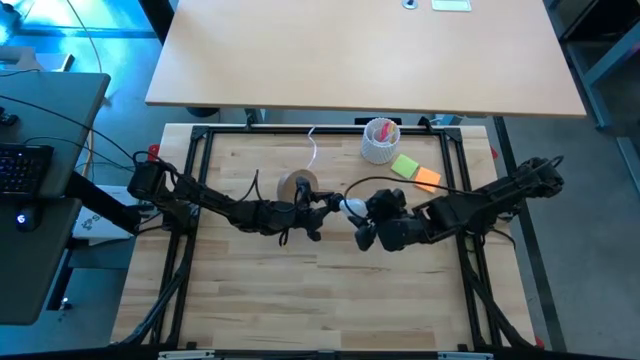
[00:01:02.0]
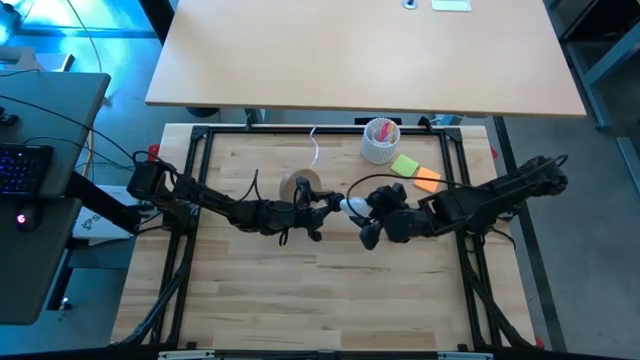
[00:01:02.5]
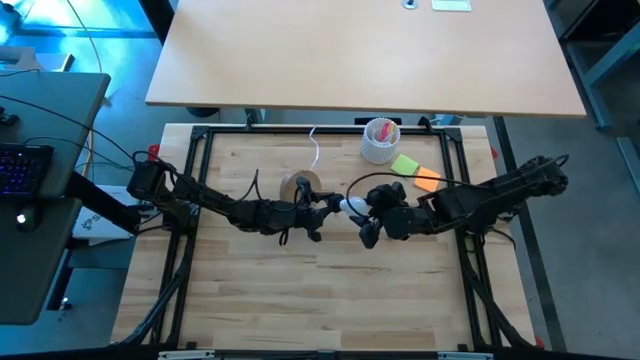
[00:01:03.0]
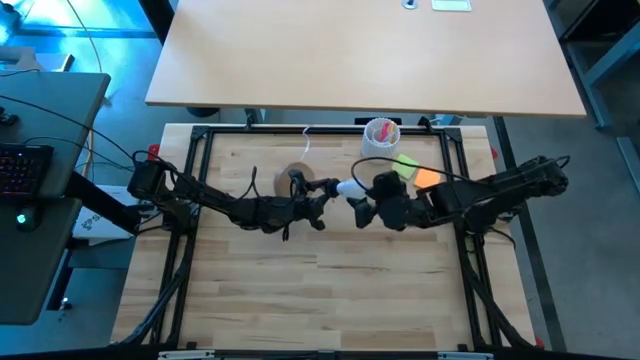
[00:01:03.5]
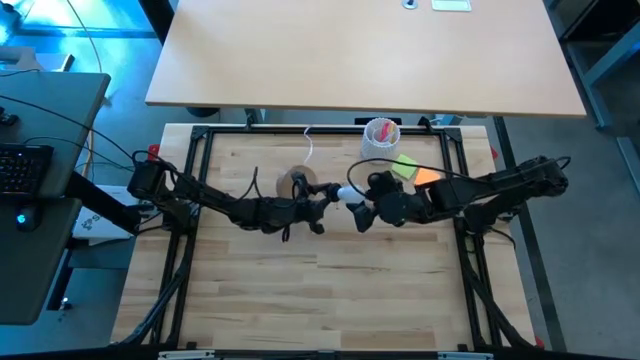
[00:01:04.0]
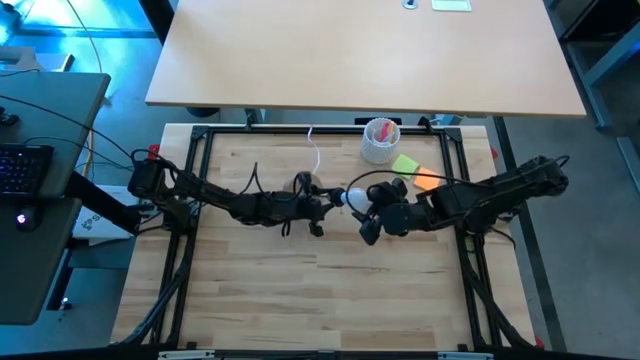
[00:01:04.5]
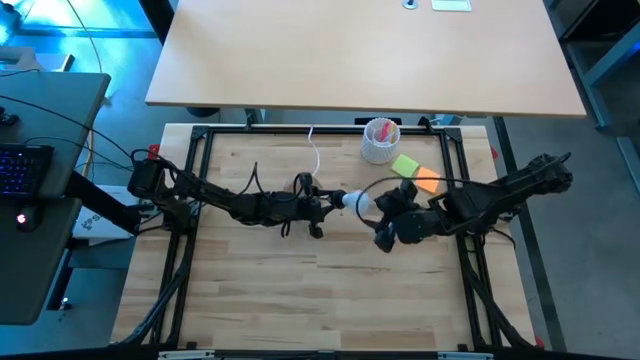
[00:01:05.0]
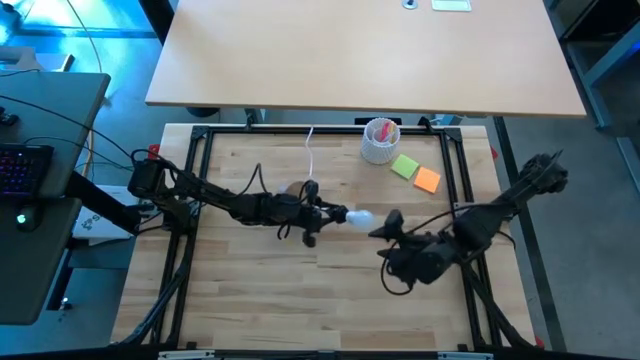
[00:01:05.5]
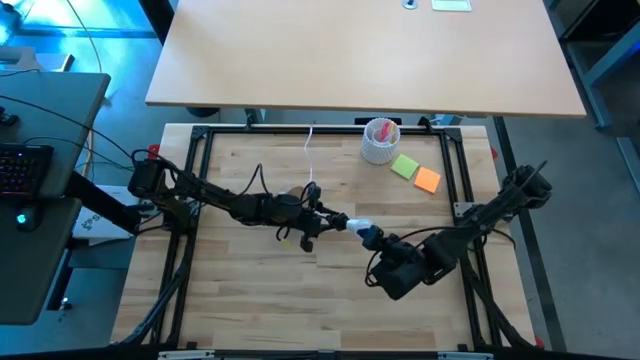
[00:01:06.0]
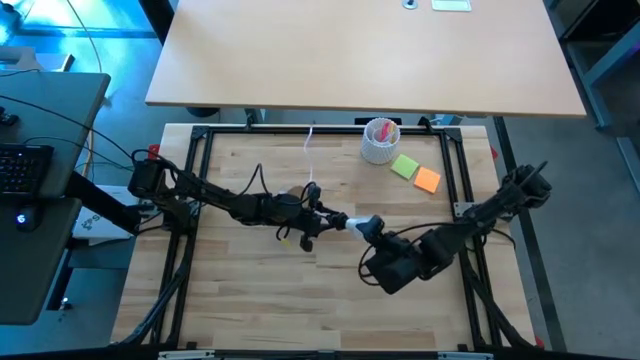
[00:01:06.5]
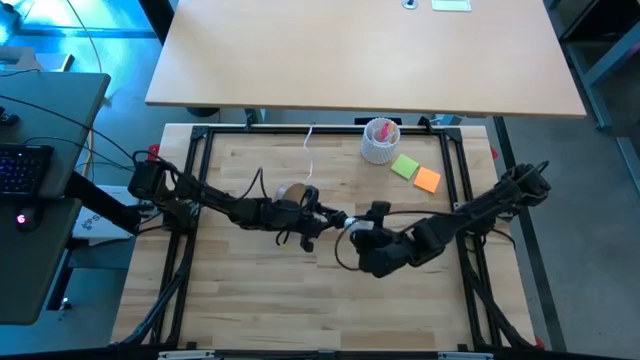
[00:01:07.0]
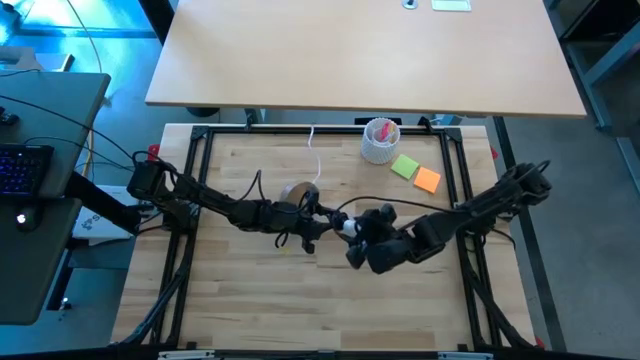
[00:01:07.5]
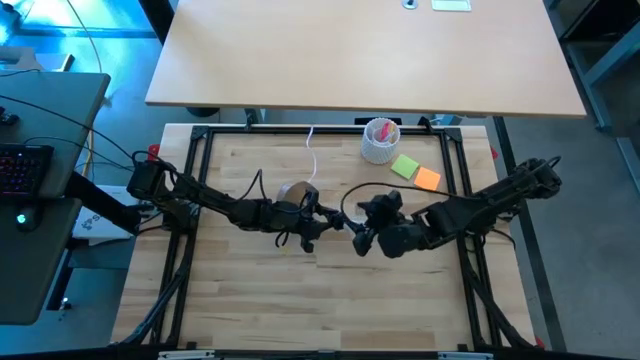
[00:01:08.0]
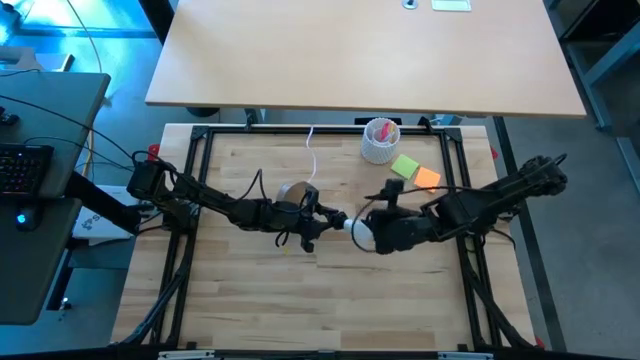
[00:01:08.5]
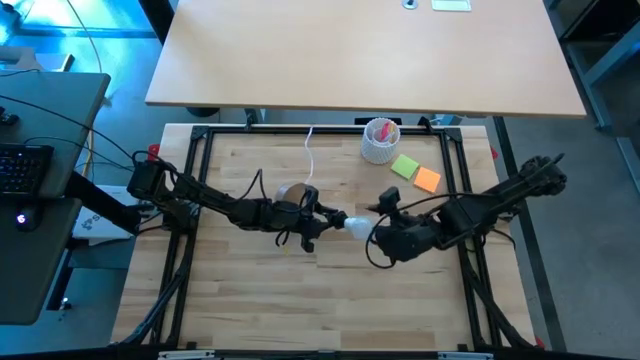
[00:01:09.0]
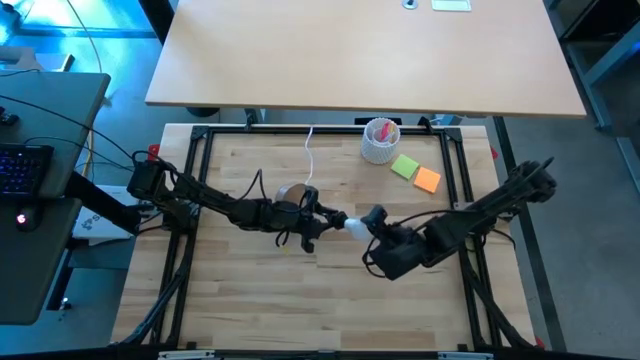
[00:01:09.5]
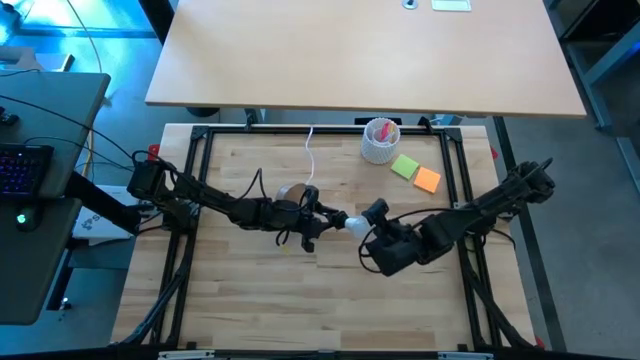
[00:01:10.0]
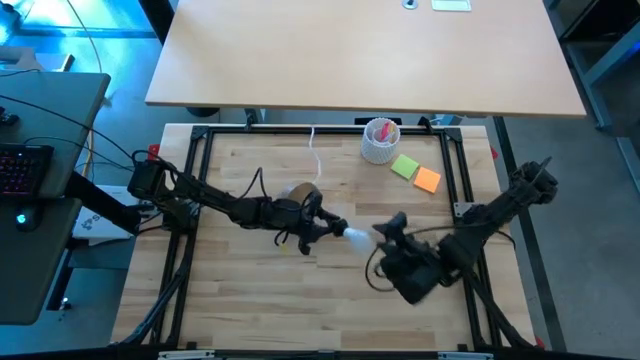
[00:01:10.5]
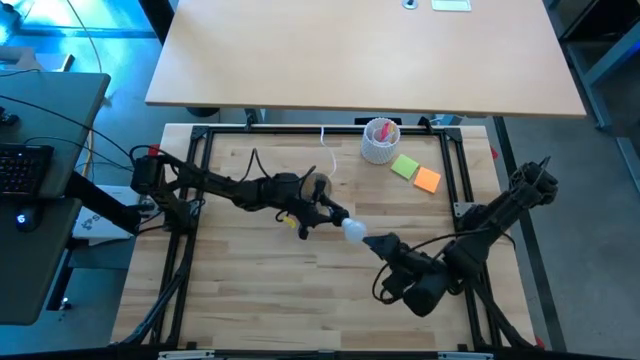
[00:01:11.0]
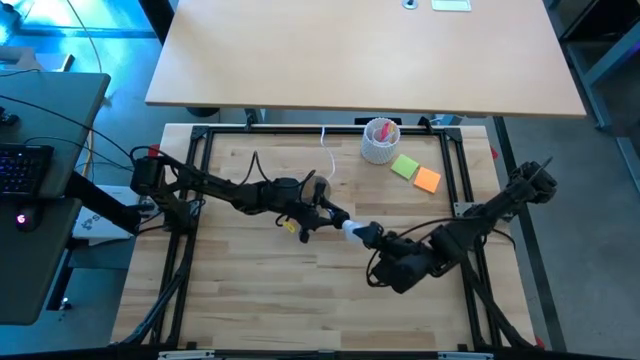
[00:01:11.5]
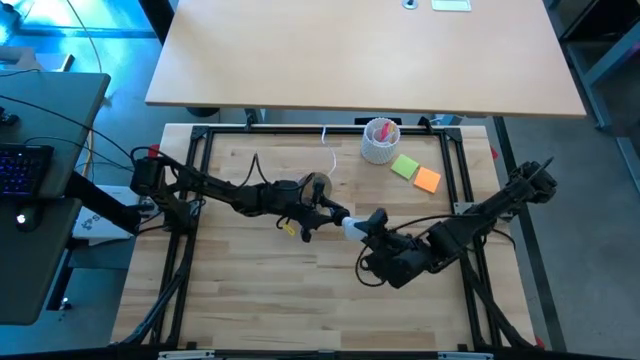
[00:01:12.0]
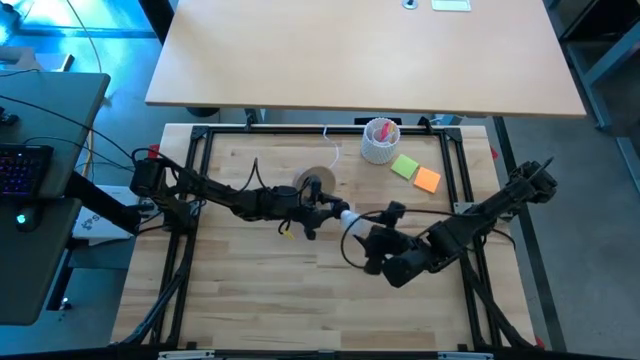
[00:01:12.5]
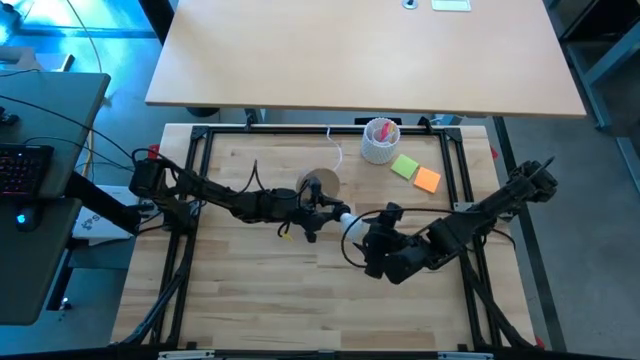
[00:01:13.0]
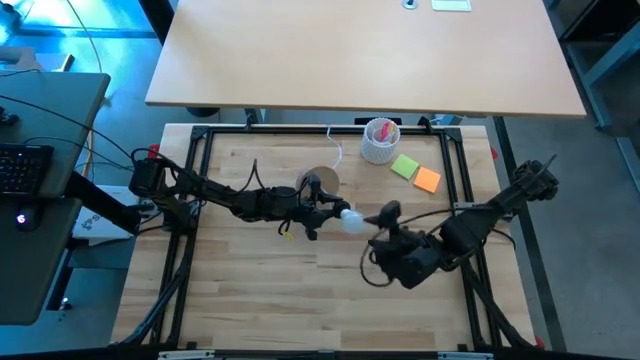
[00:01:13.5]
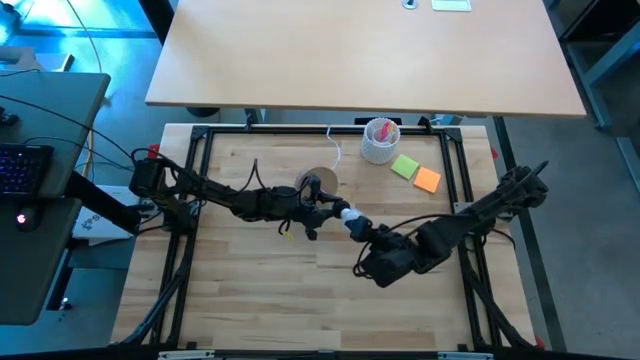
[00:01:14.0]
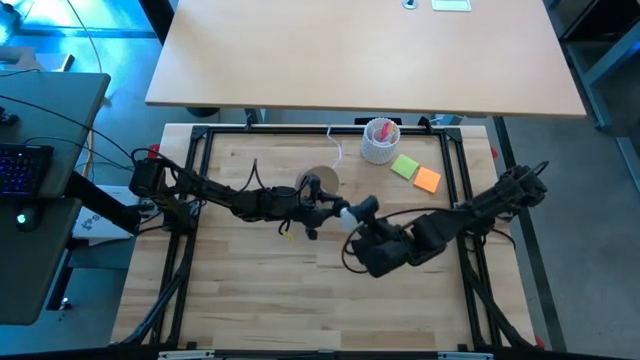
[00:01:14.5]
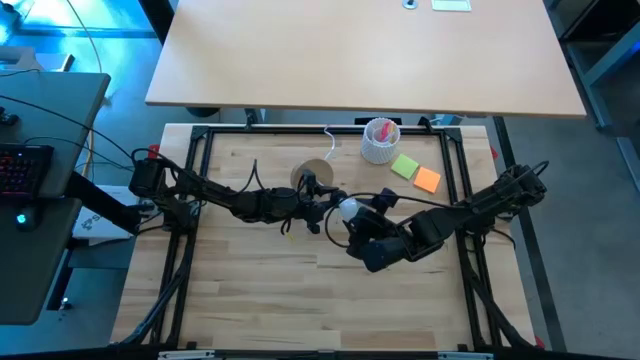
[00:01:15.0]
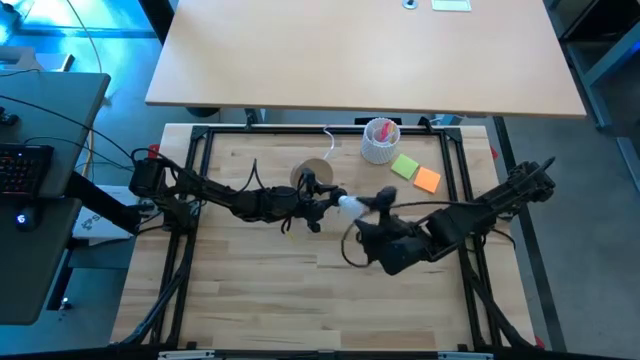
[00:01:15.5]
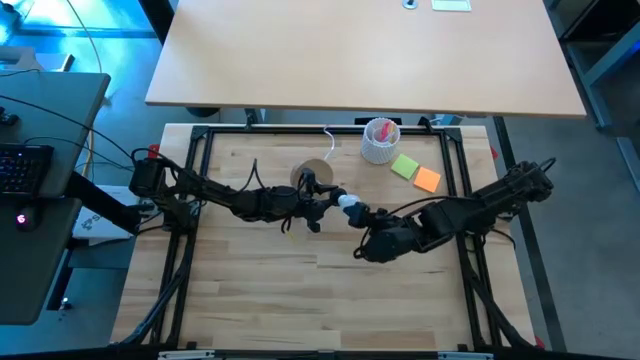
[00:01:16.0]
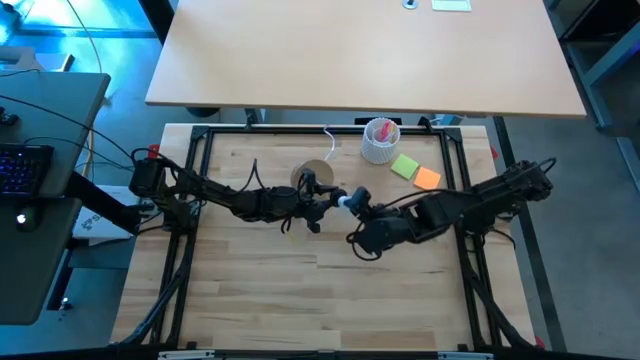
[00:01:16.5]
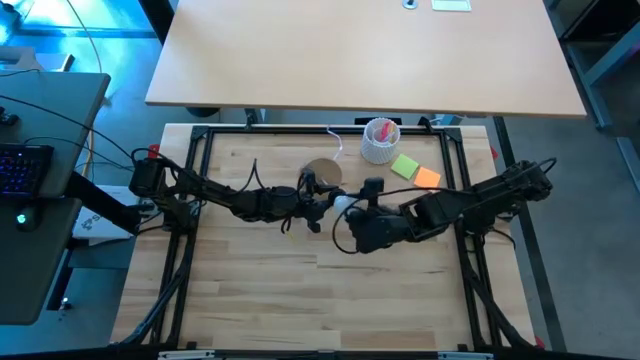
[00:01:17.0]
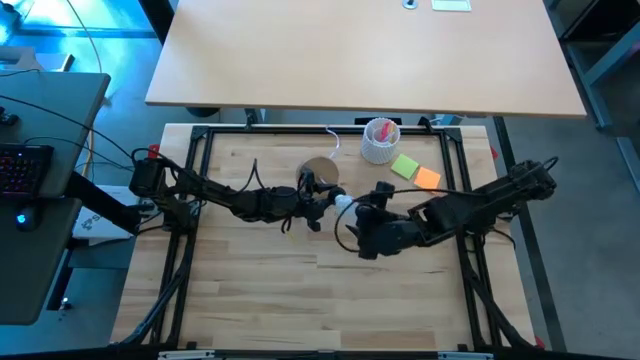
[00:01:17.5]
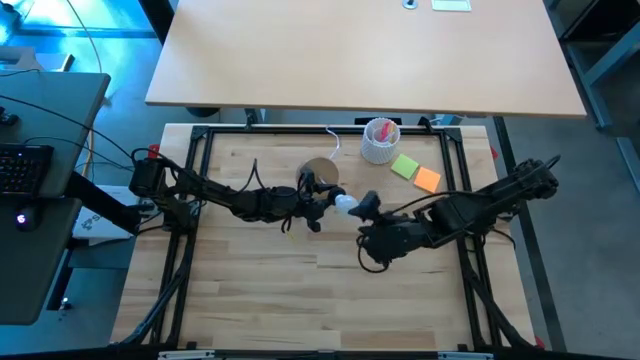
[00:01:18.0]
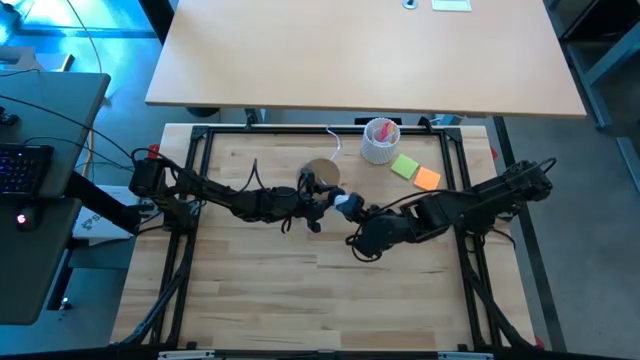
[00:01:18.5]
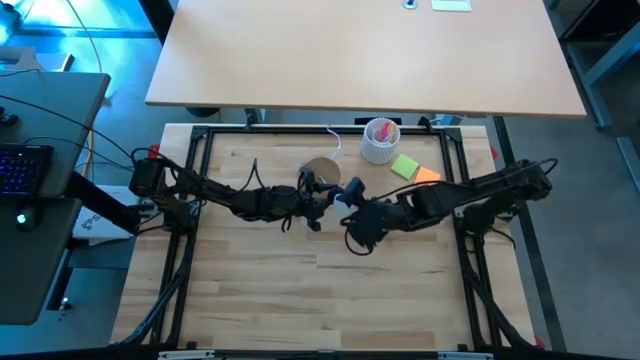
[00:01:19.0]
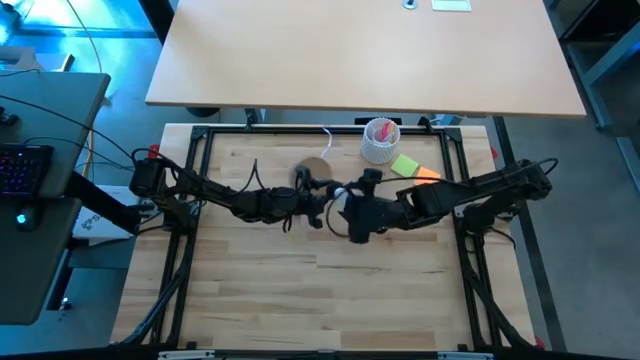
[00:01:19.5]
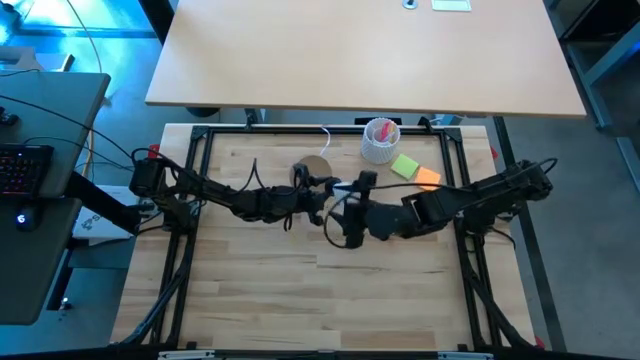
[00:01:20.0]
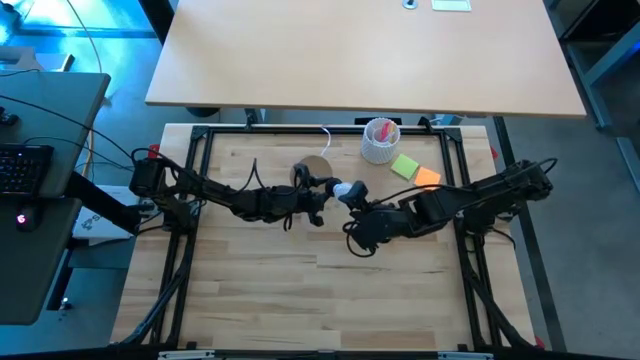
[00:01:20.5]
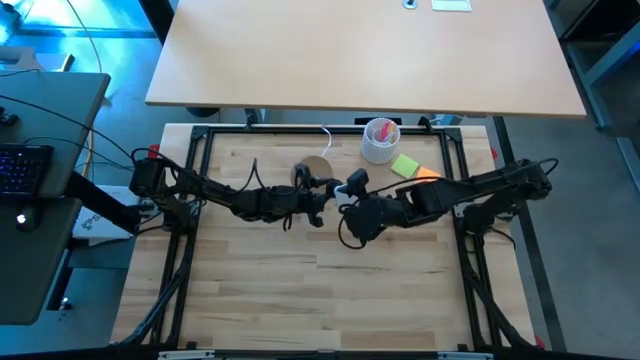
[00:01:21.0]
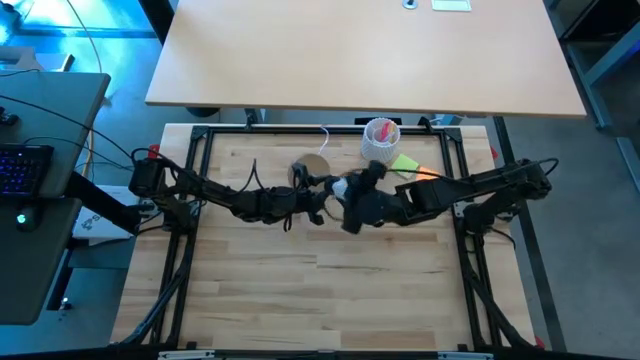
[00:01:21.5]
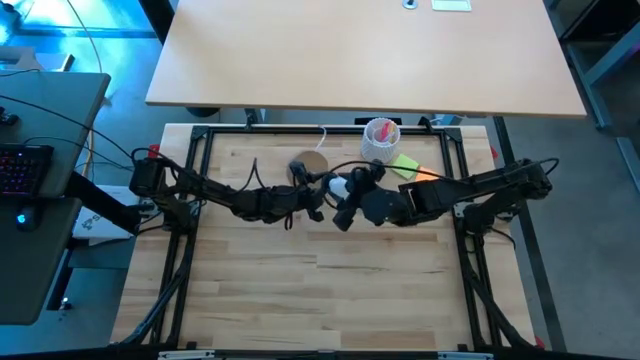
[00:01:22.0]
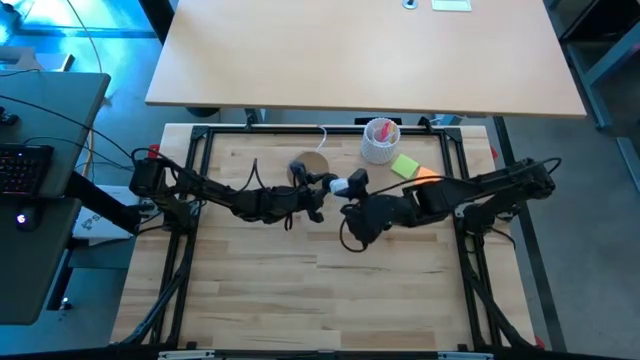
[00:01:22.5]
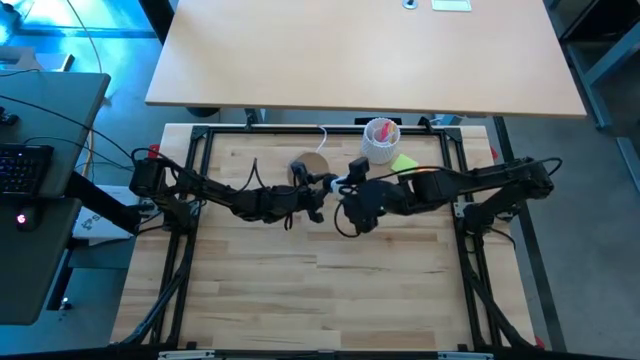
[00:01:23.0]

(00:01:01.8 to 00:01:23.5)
Task: Screw lightbulb
Insert the light bulb into the lamp
